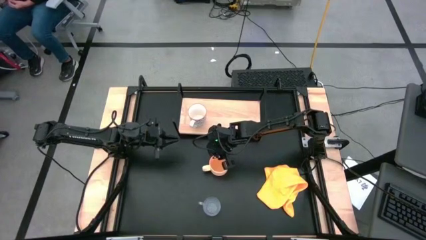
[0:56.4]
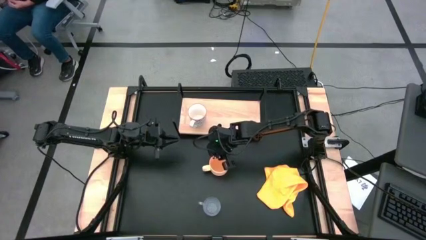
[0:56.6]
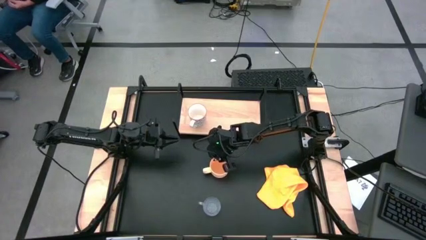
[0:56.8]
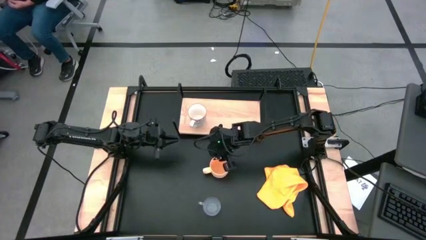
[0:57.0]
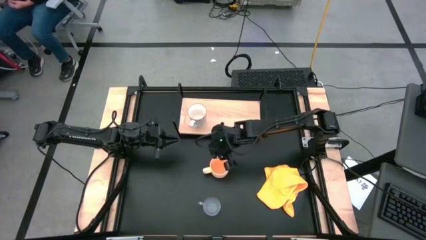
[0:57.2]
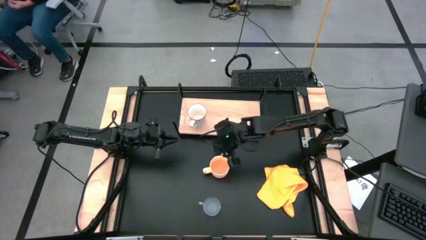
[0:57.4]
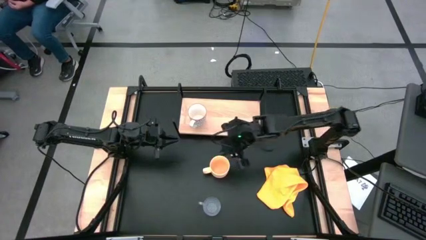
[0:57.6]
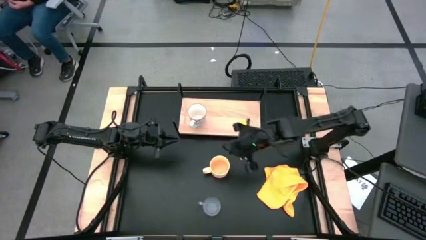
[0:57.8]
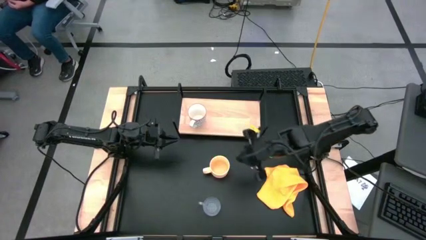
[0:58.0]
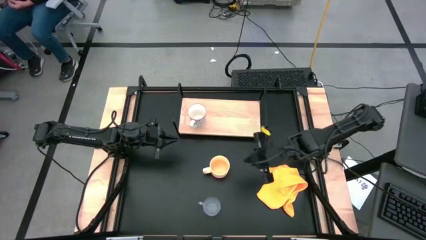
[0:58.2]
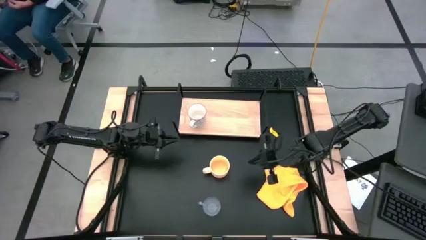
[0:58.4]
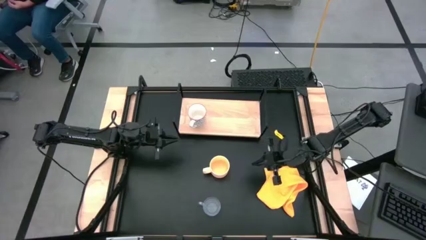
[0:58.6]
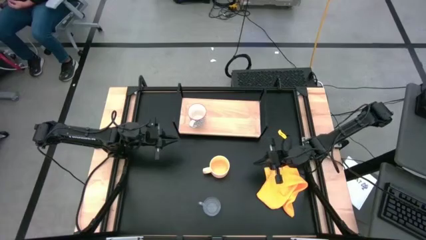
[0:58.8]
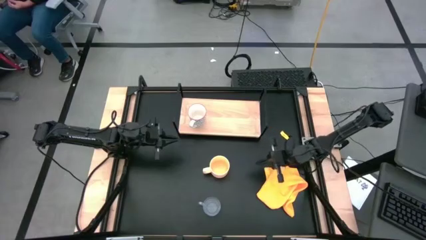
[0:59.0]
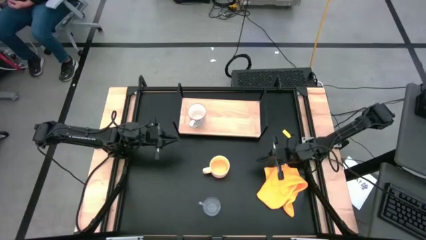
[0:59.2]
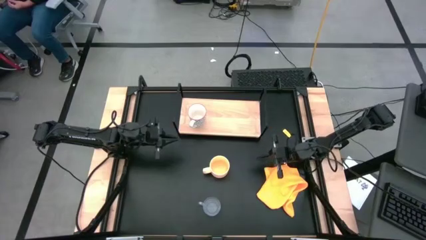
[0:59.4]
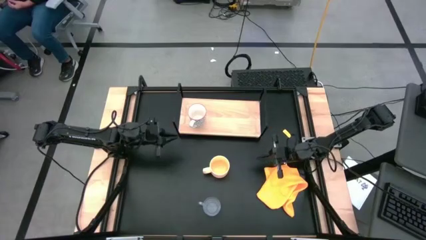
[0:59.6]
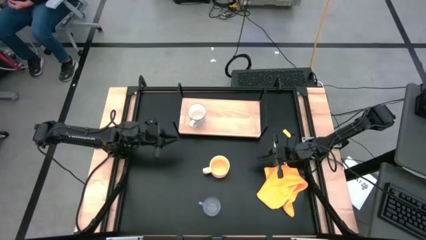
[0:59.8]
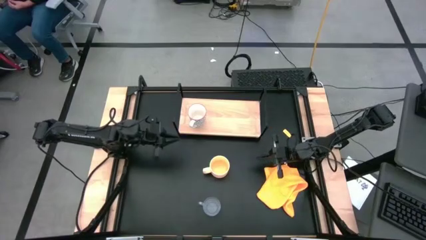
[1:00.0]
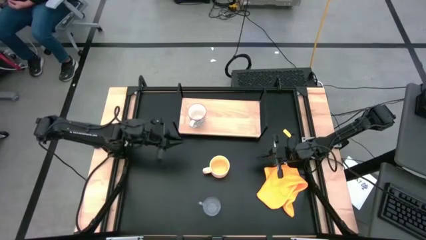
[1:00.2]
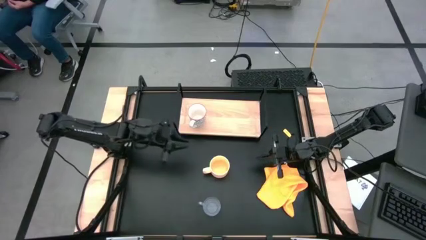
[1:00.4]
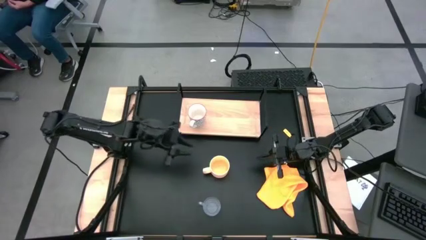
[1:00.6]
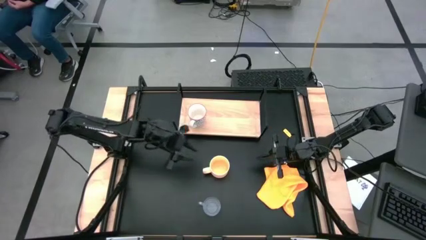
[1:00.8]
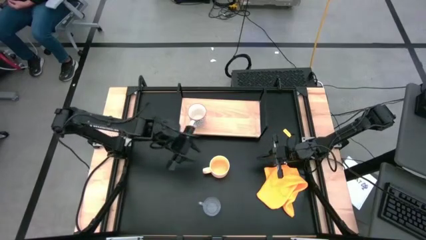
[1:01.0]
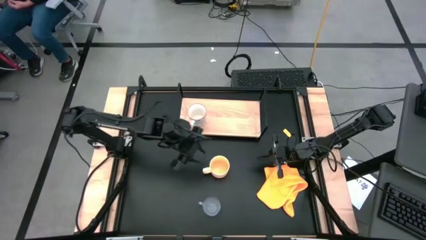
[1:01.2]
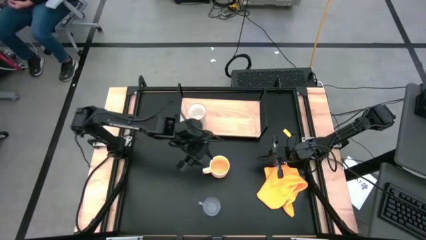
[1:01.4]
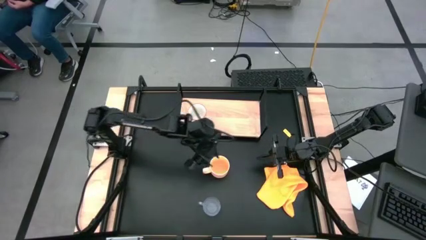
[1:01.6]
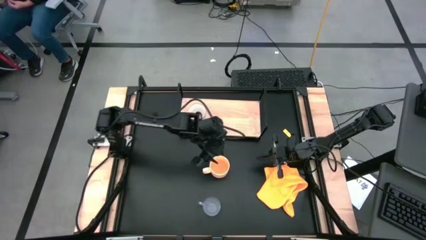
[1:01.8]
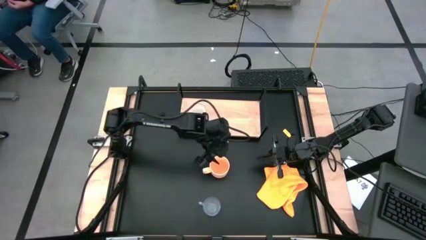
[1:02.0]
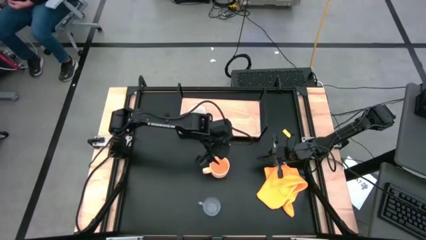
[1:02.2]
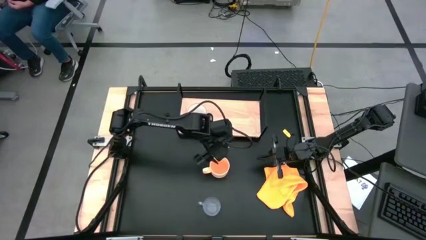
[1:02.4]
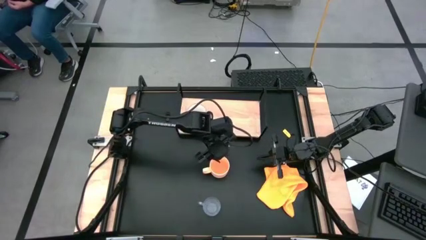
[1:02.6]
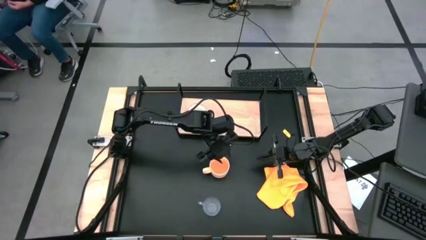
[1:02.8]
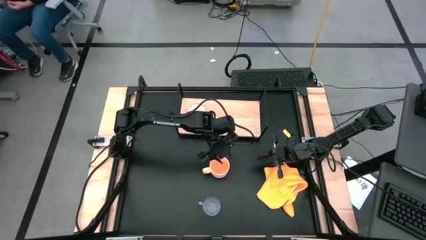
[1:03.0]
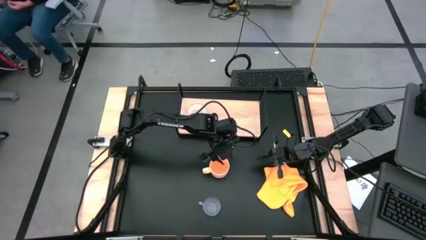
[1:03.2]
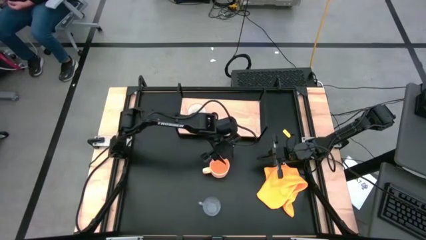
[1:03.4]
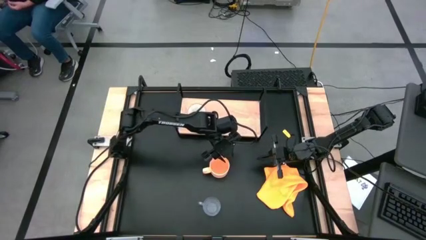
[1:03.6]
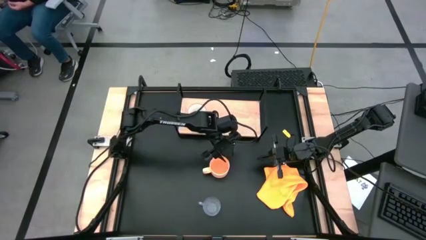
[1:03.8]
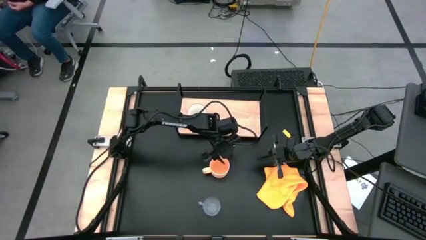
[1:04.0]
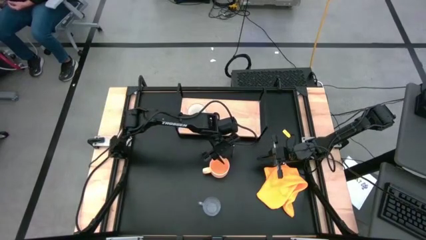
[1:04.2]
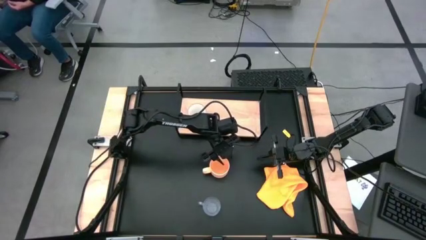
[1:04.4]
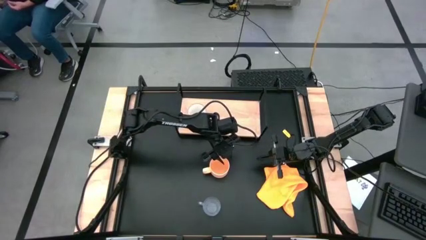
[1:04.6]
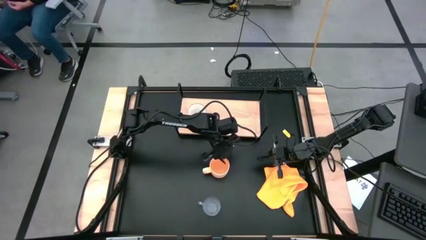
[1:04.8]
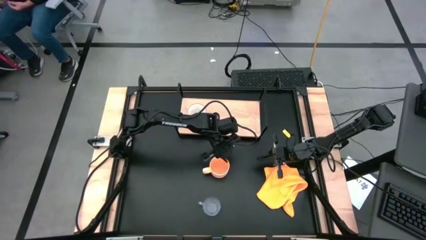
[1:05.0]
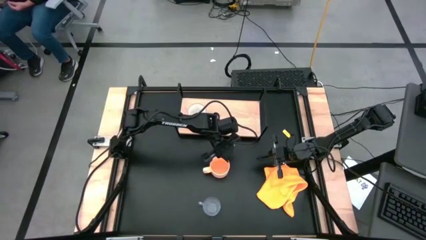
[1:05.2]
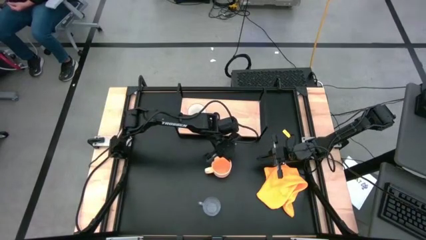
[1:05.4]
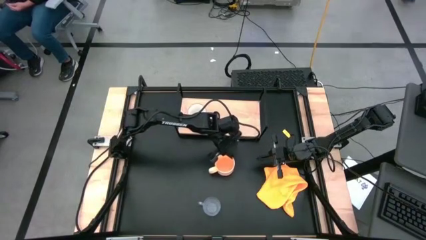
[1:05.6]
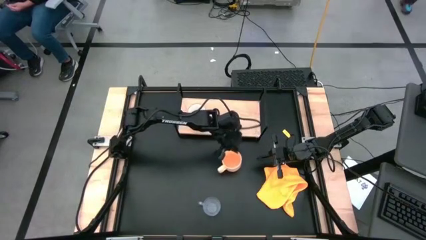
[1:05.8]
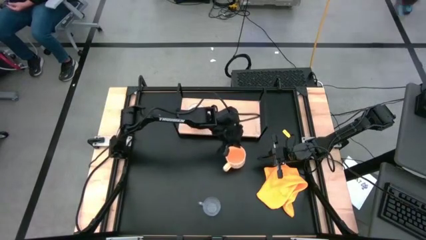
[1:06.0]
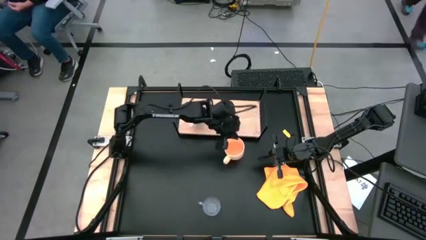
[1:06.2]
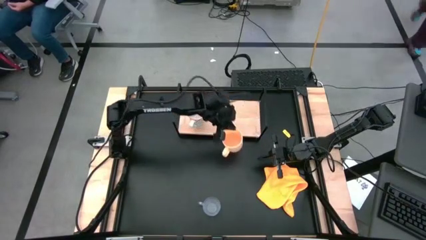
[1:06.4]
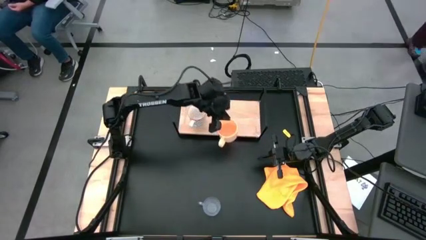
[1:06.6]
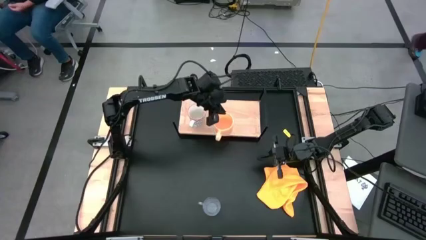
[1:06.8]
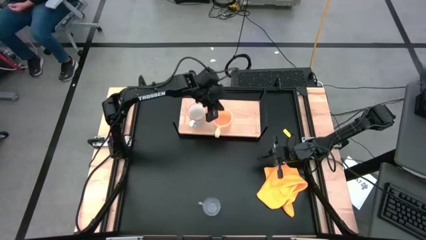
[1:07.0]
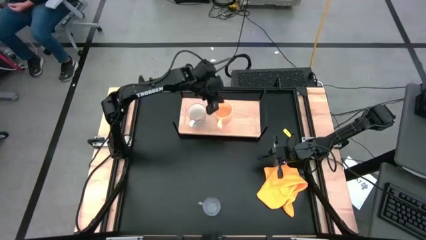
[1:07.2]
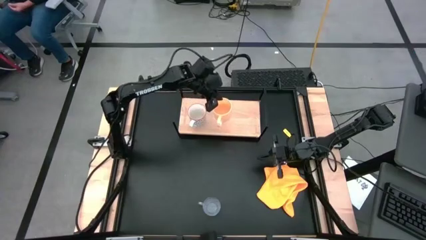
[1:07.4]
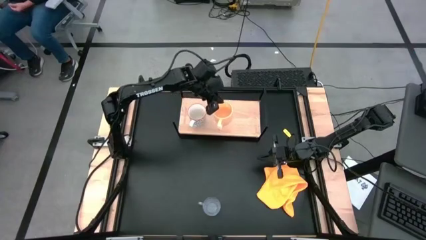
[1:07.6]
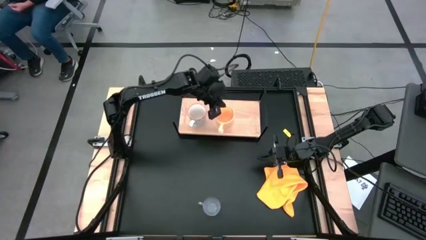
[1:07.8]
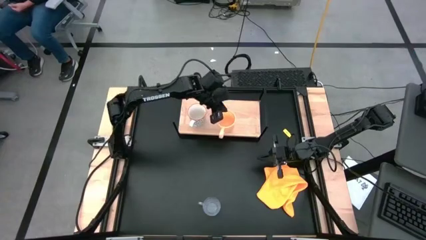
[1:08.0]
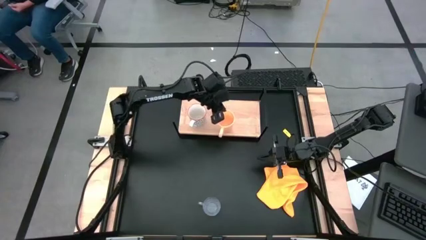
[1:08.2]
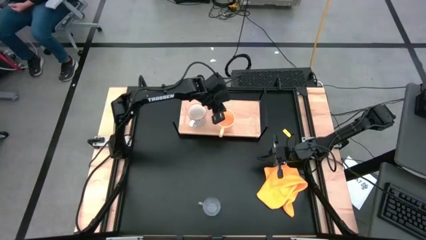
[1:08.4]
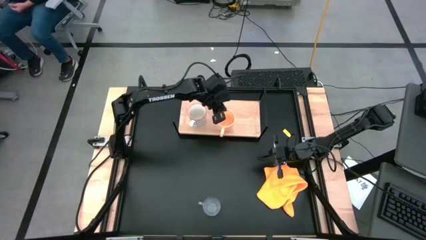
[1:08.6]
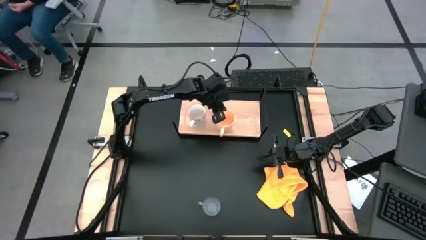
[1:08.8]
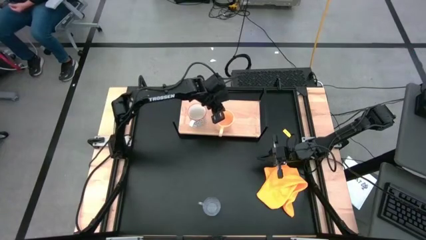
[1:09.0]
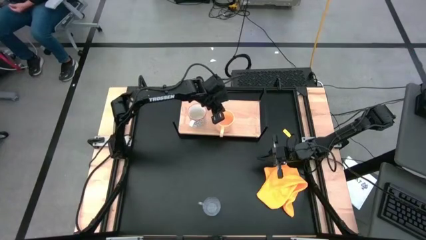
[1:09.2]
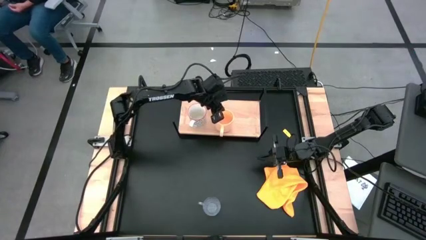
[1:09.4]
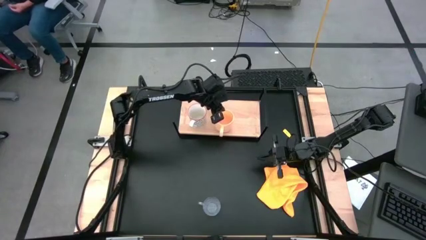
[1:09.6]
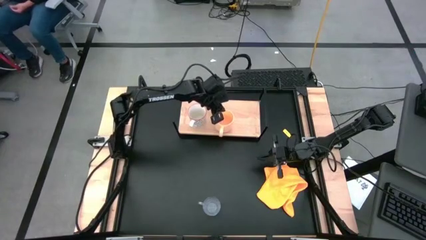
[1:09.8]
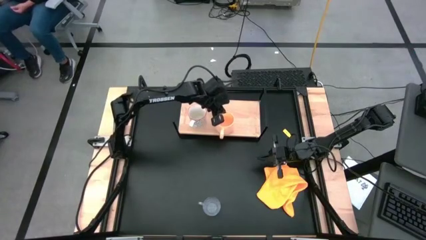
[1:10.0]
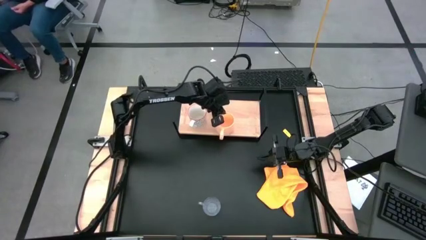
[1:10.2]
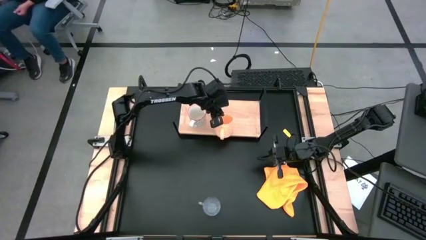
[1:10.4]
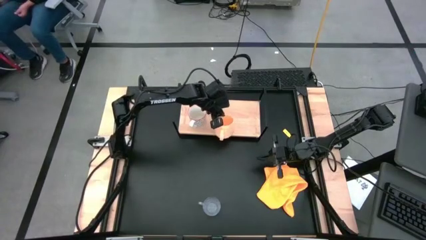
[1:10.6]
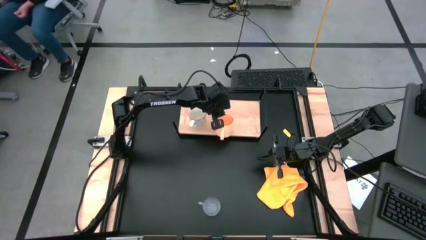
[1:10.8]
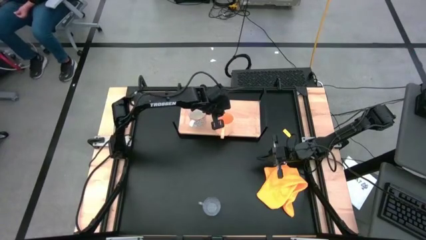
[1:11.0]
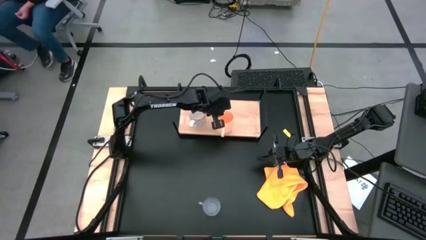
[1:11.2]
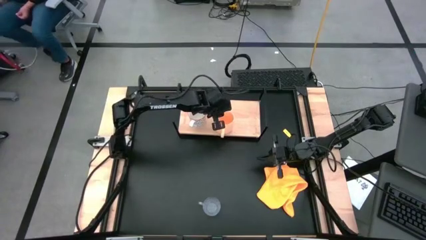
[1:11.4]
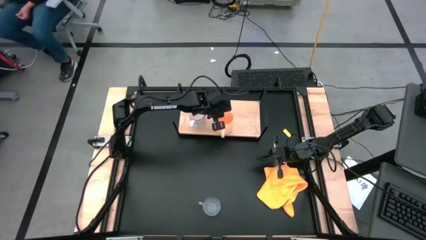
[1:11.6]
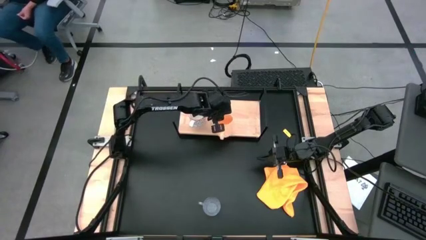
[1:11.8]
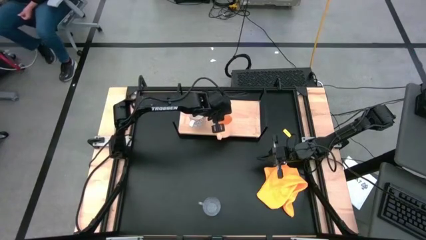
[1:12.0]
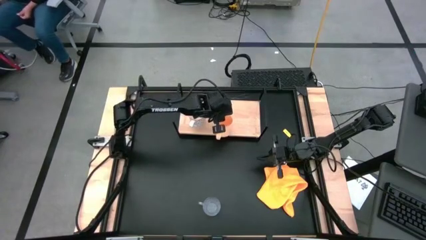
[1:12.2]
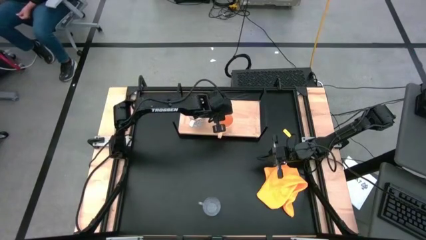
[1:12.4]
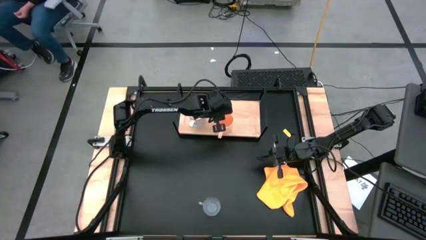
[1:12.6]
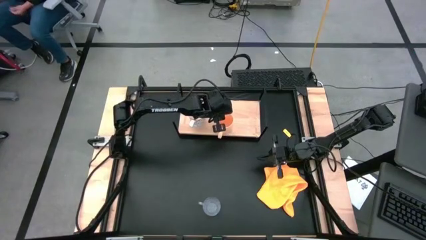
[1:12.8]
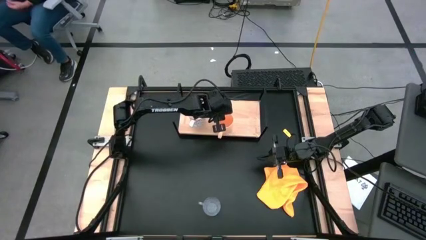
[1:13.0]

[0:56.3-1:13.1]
Task: Stack small to large cups/mugs on shelf
Put the orange mug on the shelf
